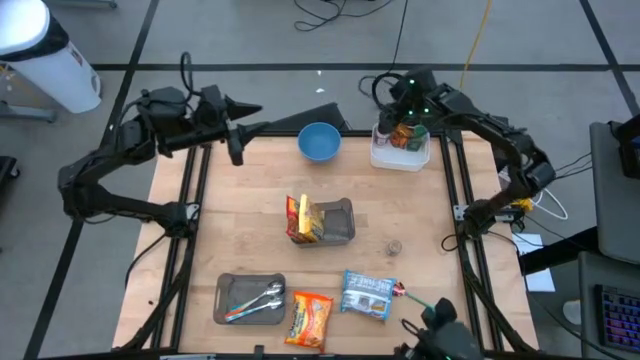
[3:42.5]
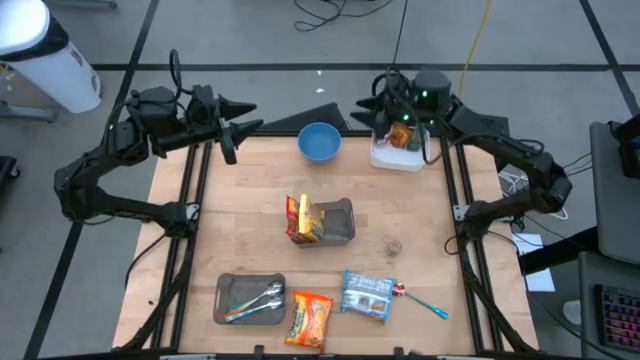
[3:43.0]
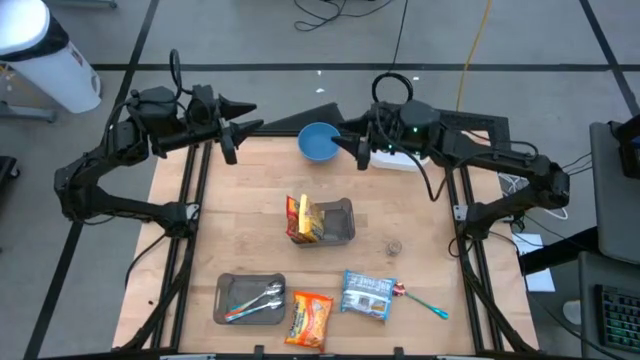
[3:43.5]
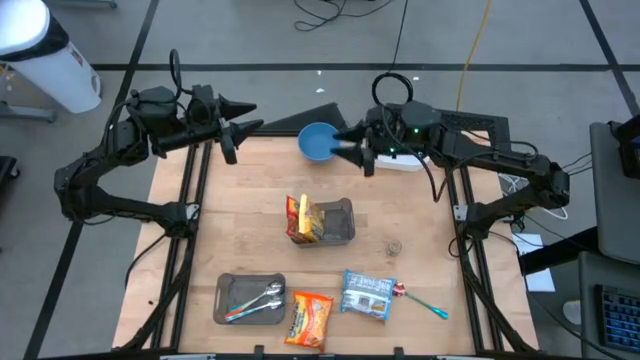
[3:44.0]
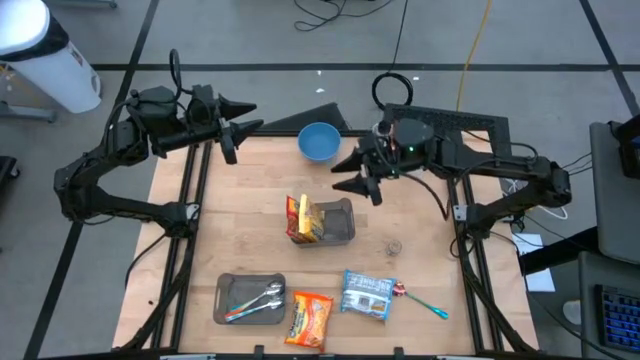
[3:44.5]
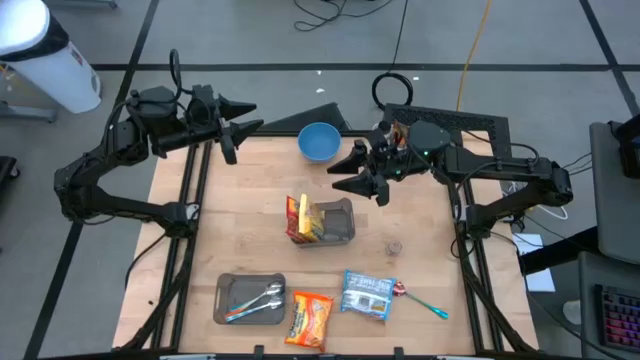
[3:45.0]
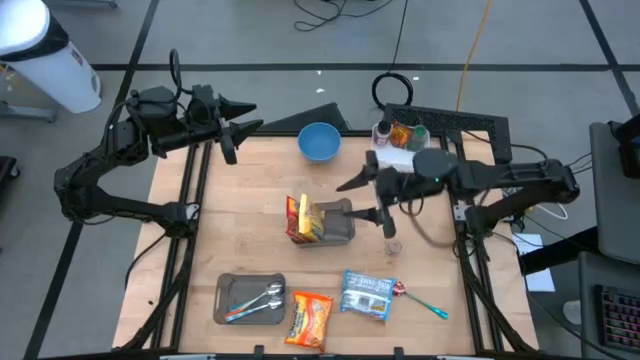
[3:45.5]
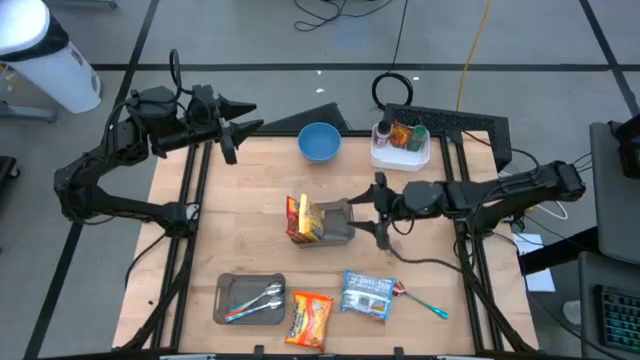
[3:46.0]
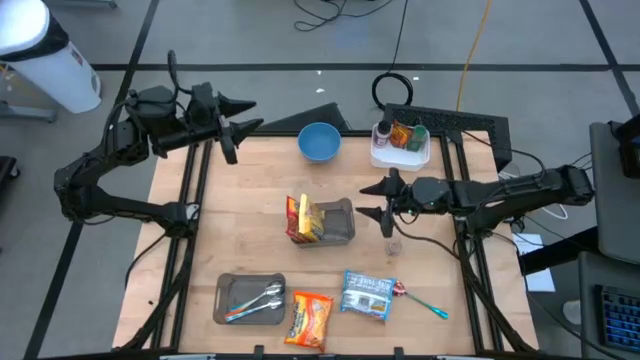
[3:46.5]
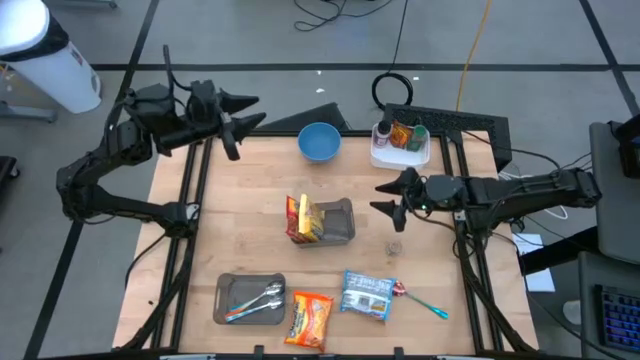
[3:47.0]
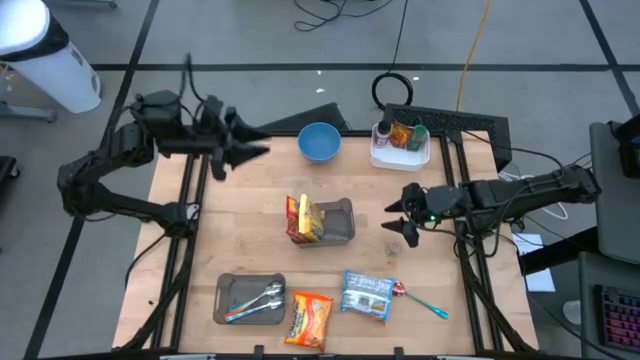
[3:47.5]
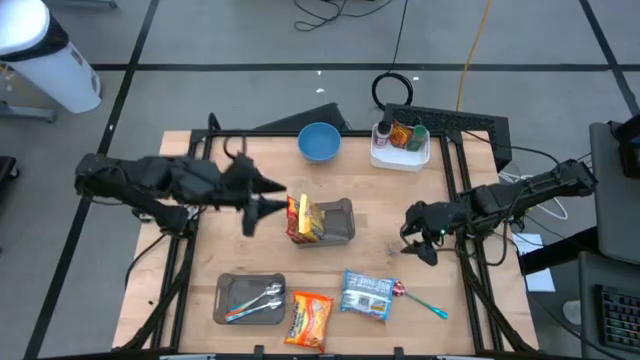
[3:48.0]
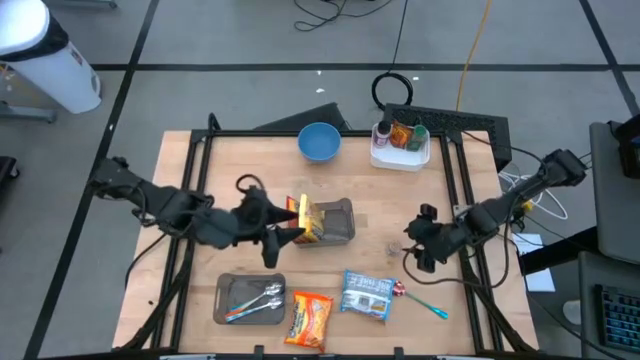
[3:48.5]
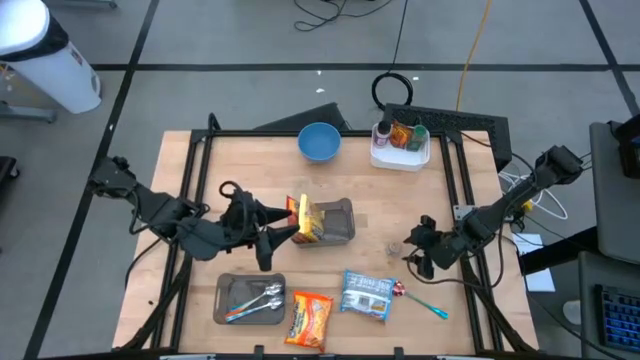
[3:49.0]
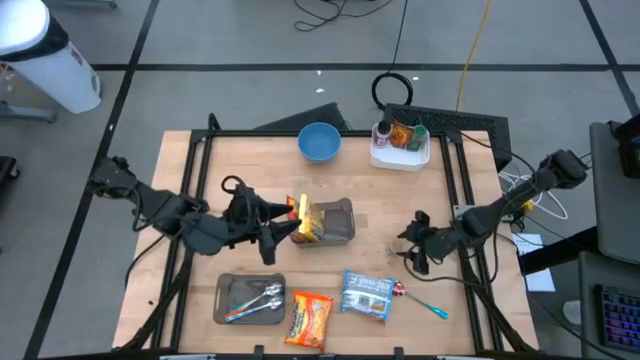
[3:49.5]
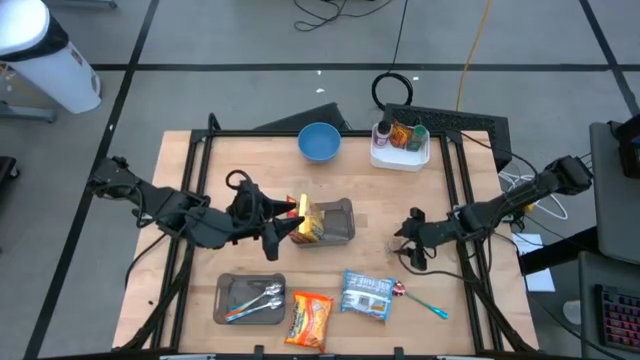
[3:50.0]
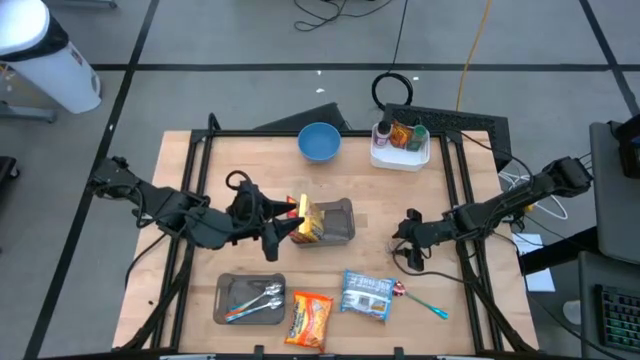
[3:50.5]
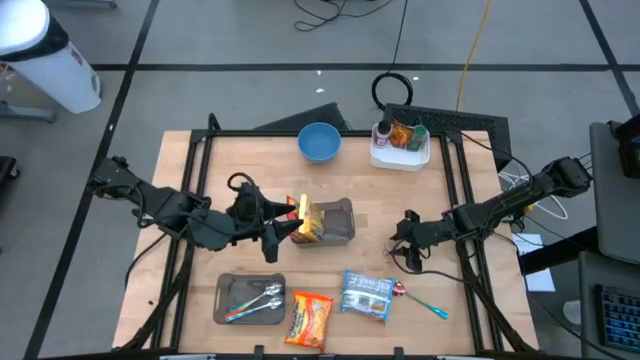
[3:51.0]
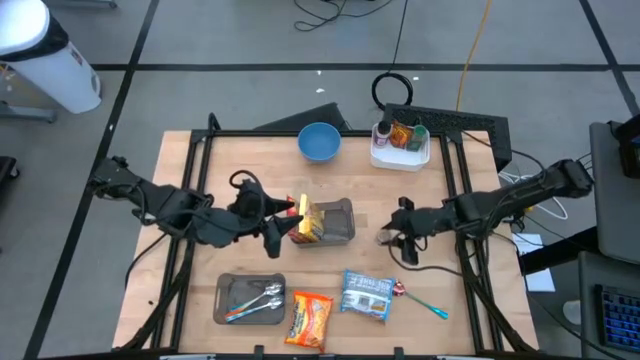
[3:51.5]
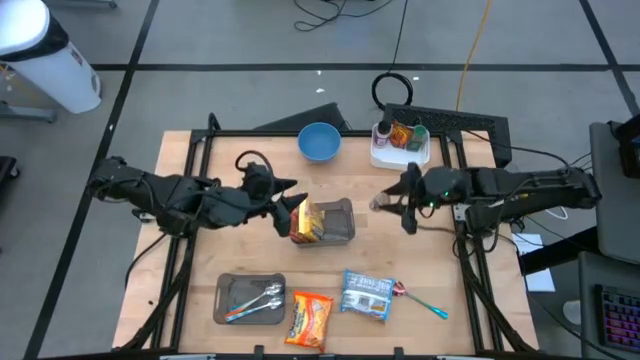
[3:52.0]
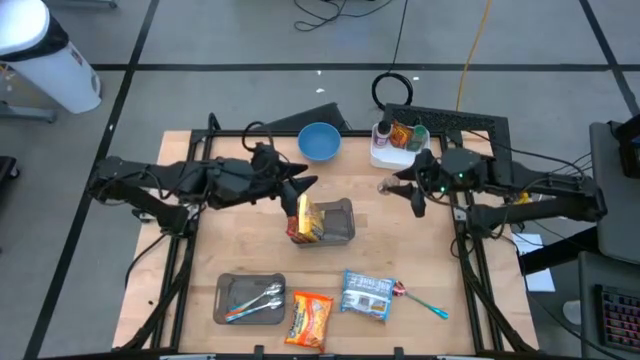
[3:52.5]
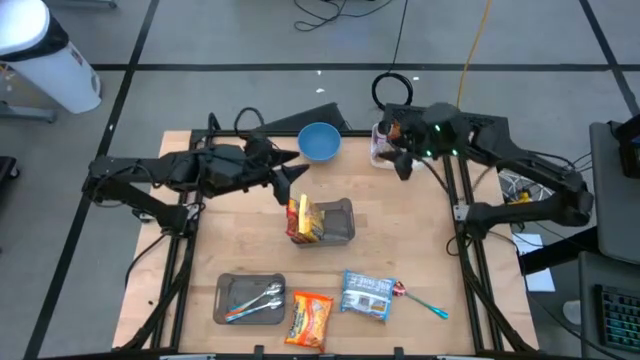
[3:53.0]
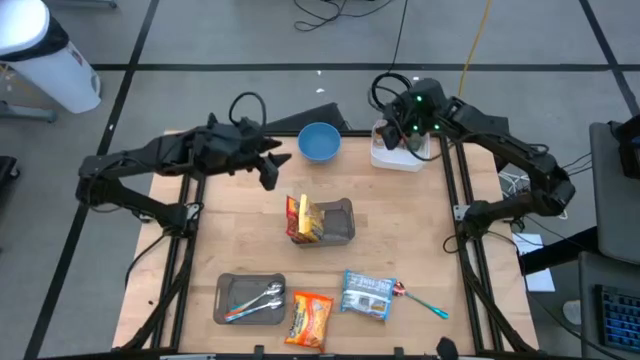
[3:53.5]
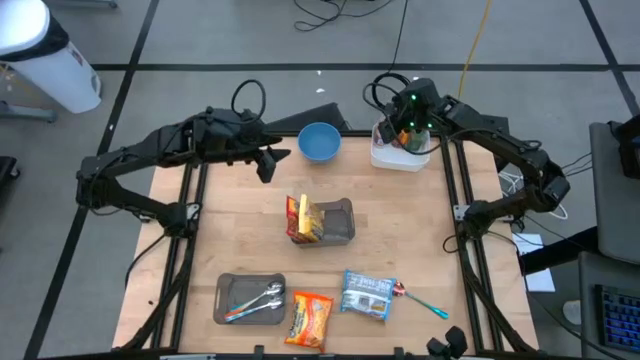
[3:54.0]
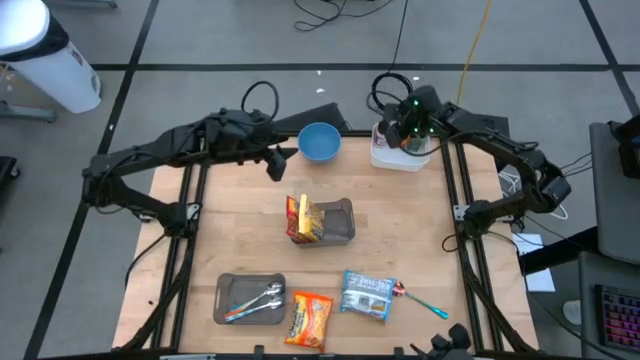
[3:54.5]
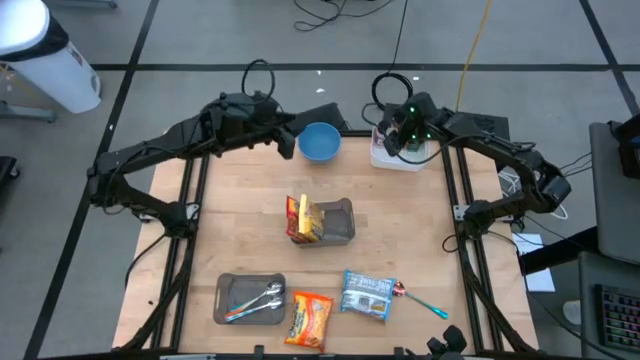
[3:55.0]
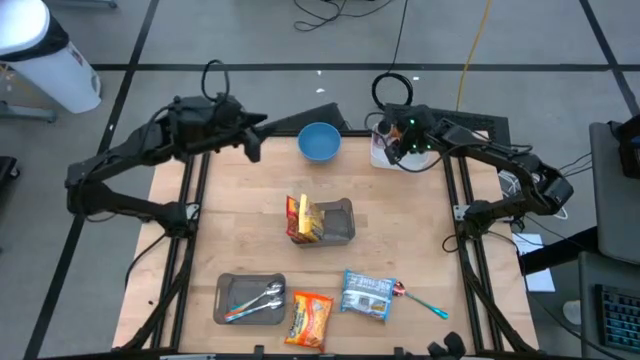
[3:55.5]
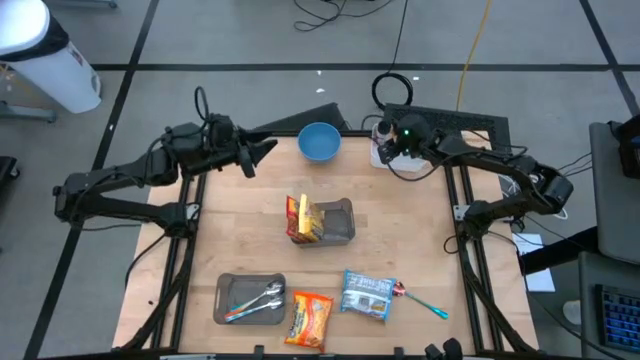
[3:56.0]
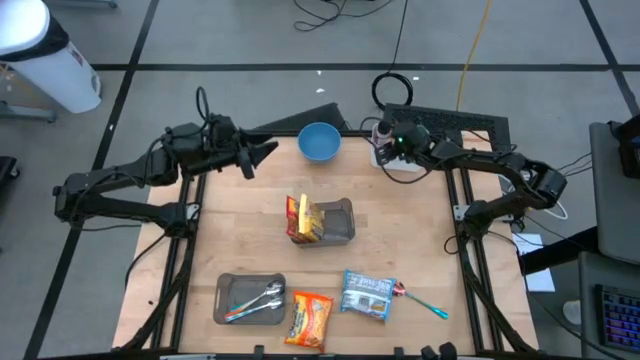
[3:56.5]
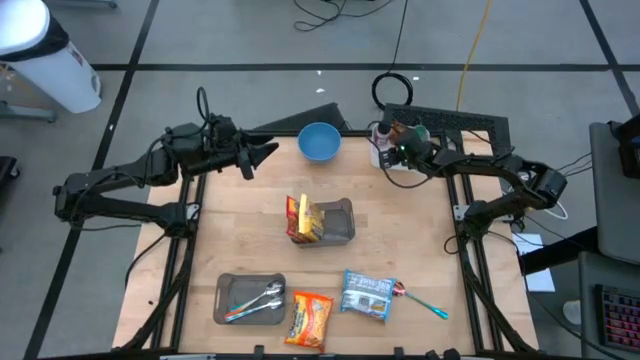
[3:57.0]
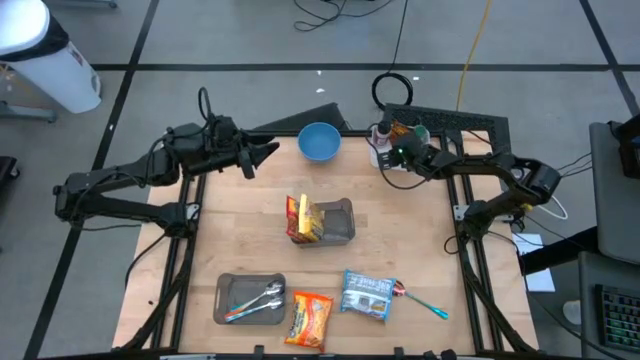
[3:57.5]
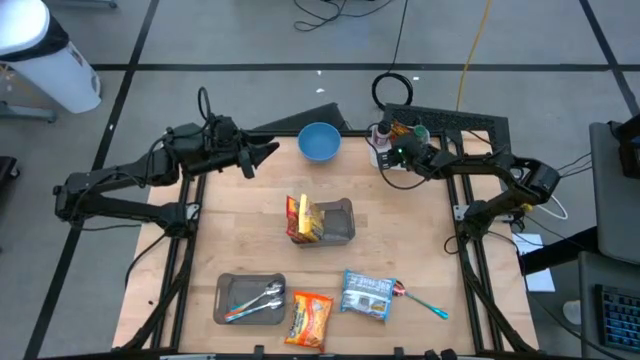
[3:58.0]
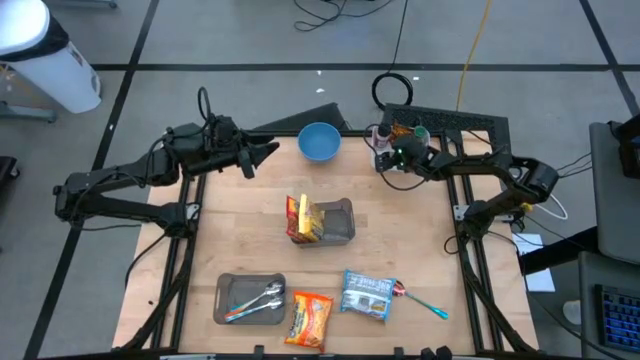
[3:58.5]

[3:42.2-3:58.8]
Task: Pick & Place Food Item
Put the brown seasoning bottle into the top white bin

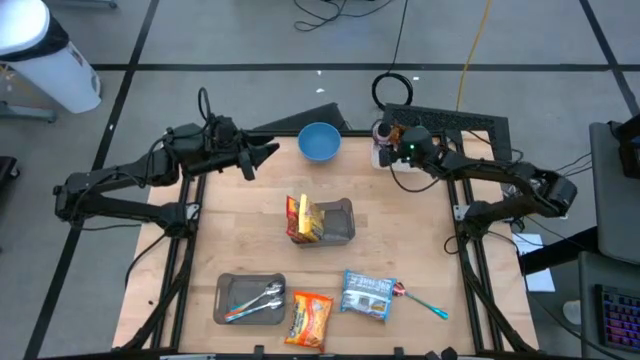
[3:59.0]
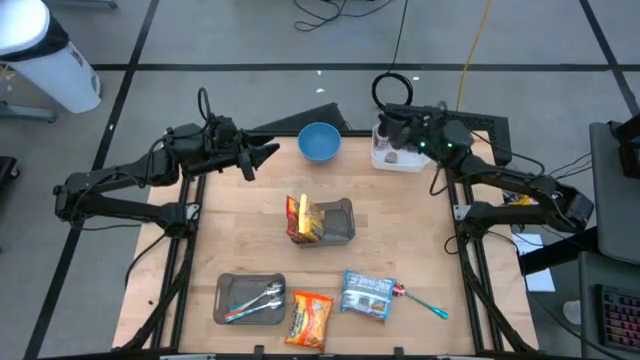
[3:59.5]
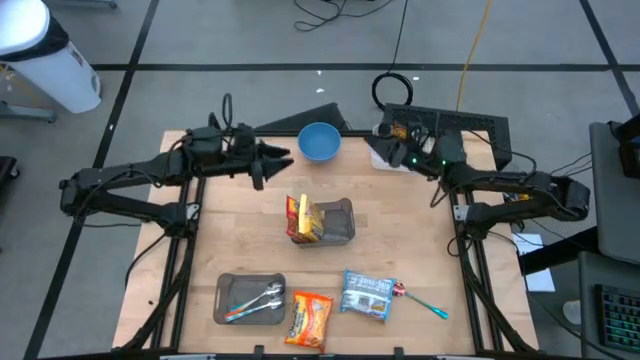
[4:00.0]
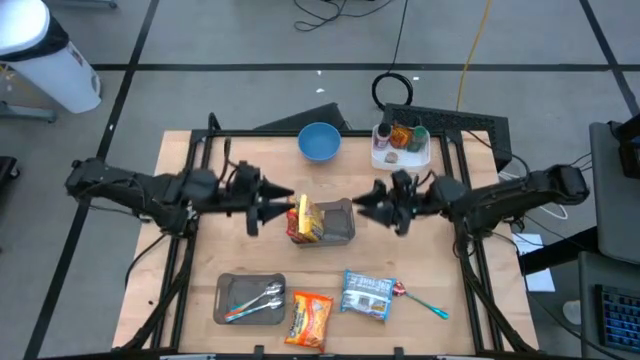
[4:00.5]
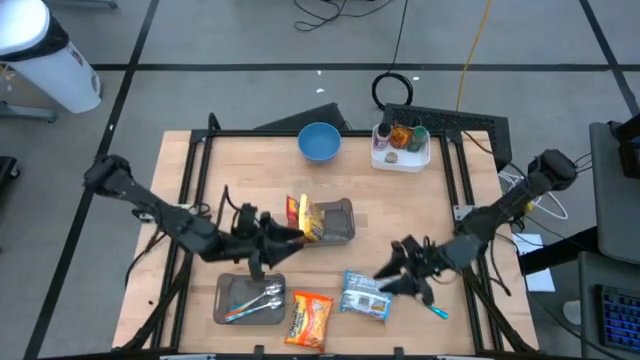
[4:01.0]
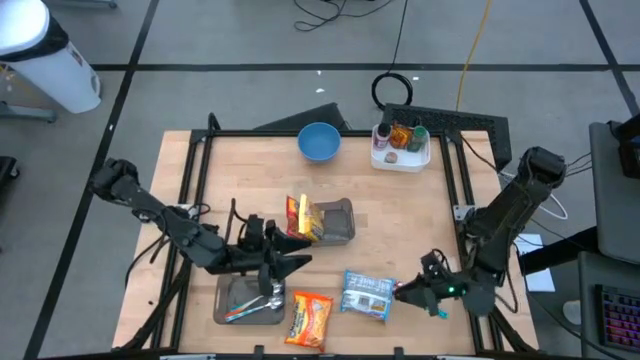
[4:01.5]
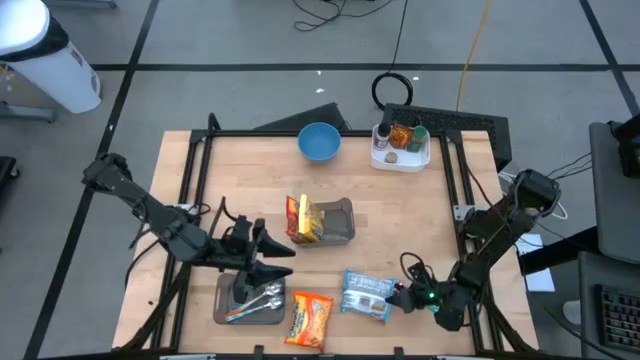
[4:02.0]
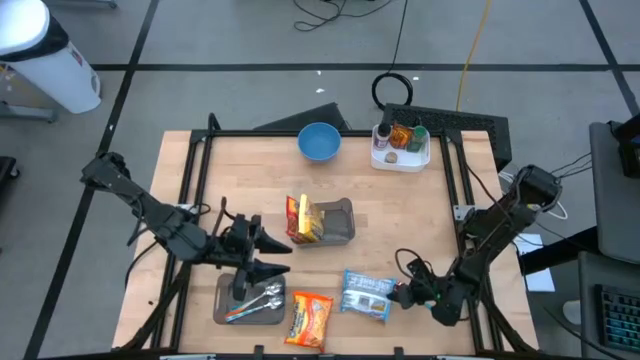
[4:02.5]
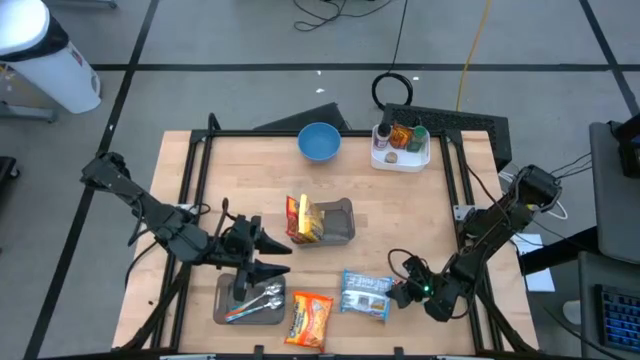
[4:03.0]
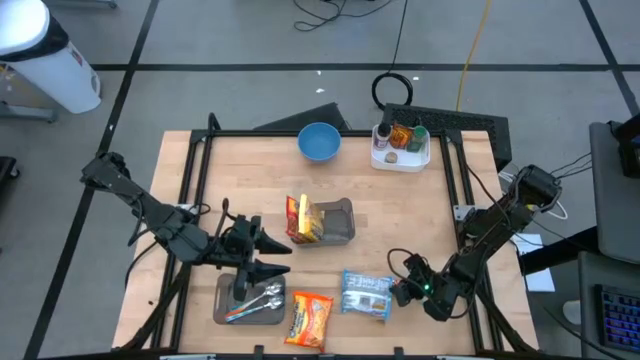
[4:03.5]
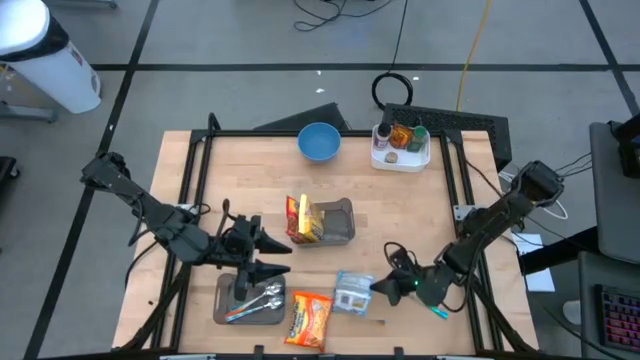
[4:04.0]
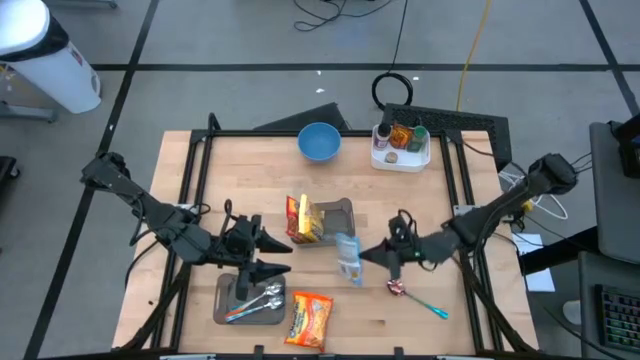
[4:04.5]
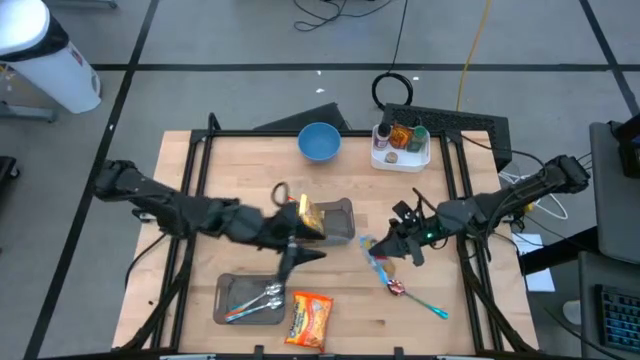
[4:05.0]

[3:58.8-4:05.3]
Put the blue noodle pack into the top black bin
